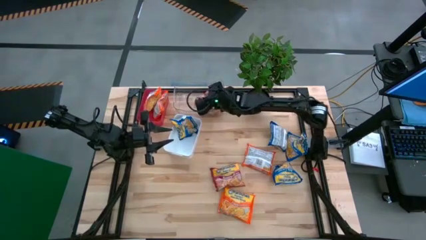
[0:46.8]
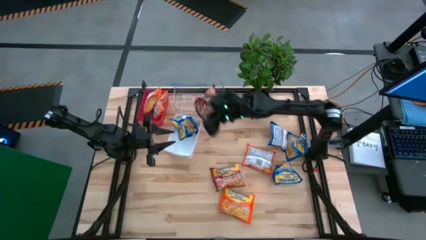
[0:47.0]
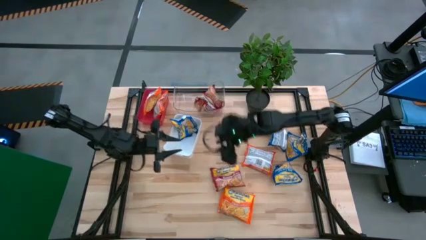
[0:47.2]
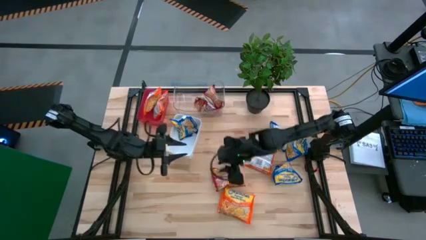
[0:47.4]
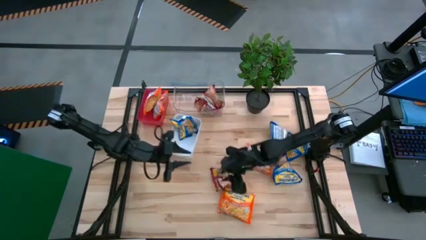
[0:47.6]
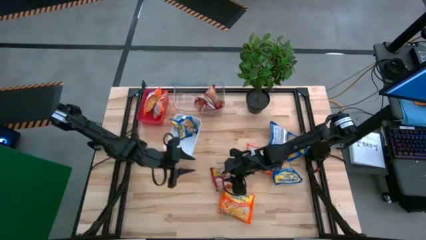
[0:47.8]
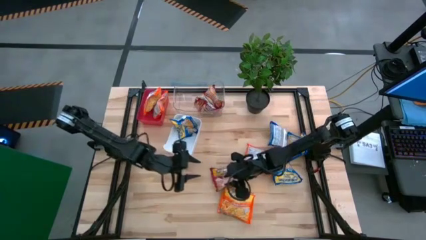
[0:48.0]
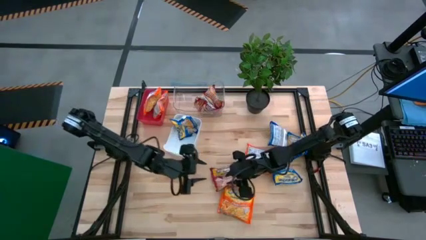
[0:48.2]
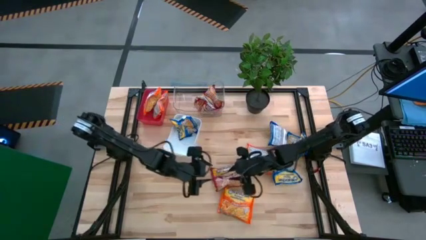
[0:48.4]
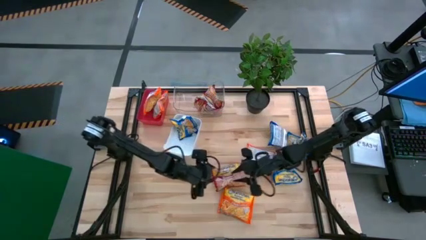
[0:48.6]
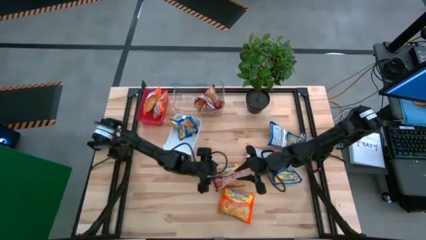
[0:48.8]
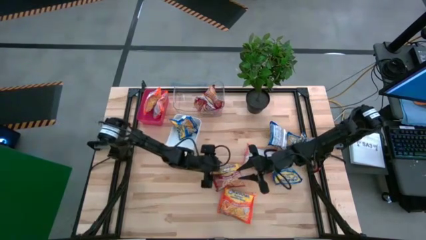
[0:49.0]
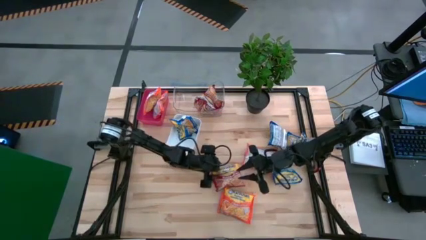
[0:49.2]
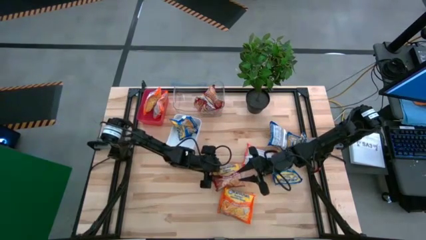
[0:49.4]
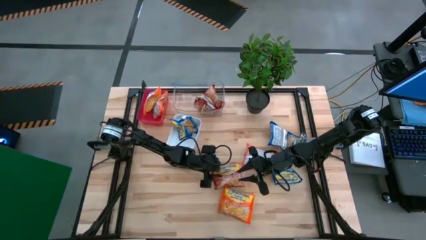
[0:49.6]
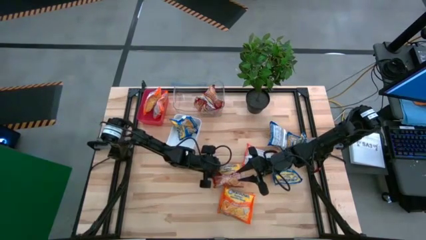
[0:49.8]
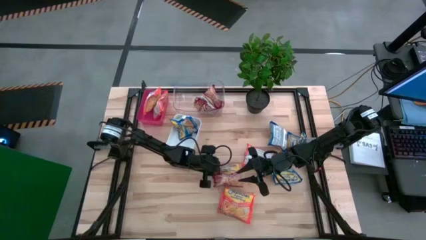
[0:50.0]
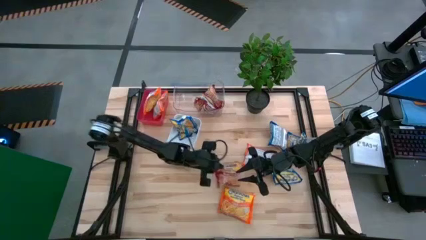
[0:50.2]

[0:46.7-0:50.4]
Task: Sort Maruchan noodles
Put the red noodle pack into the transparent bin

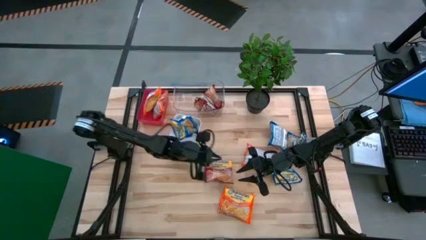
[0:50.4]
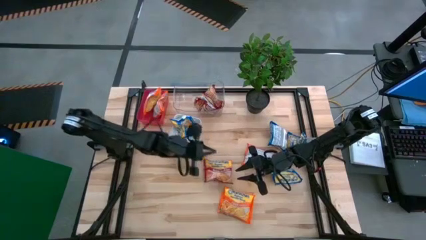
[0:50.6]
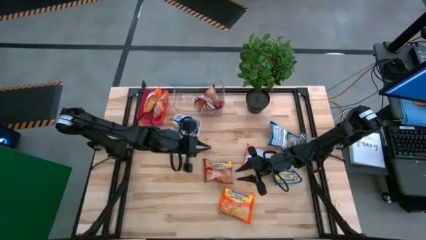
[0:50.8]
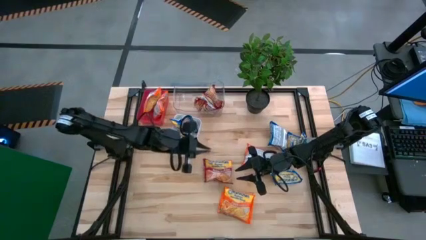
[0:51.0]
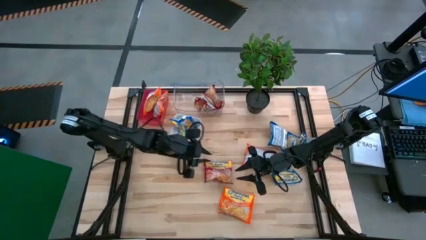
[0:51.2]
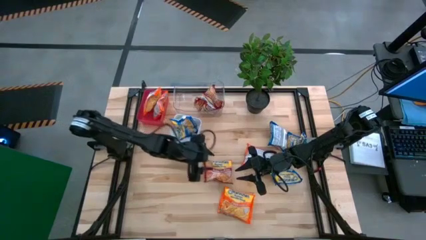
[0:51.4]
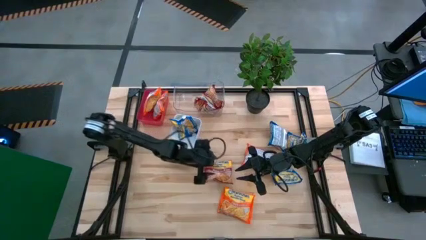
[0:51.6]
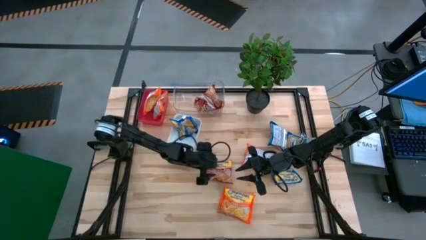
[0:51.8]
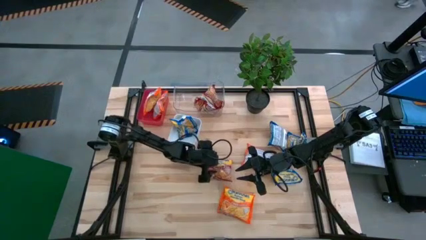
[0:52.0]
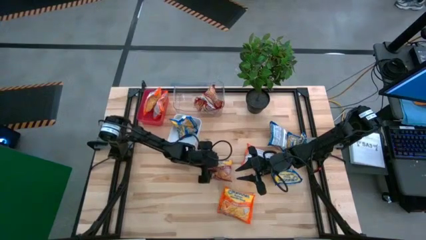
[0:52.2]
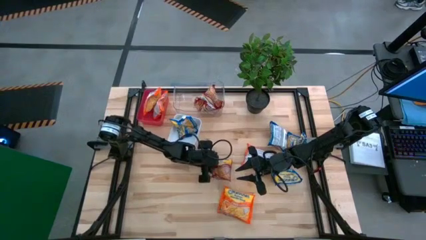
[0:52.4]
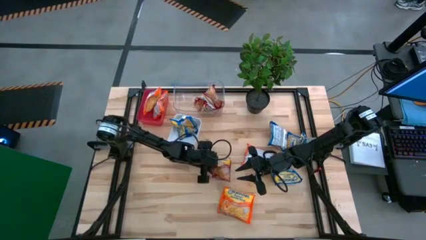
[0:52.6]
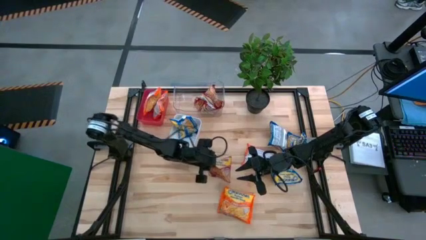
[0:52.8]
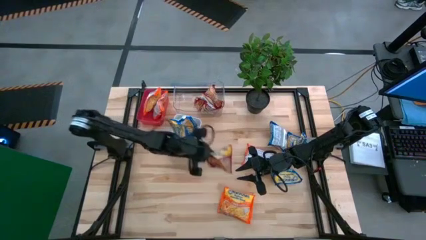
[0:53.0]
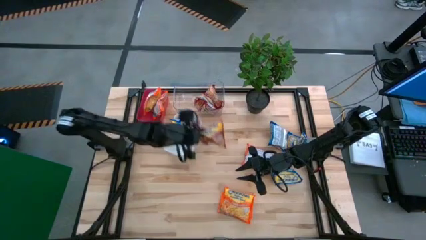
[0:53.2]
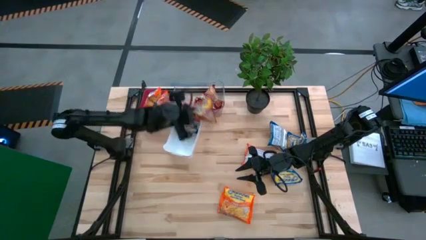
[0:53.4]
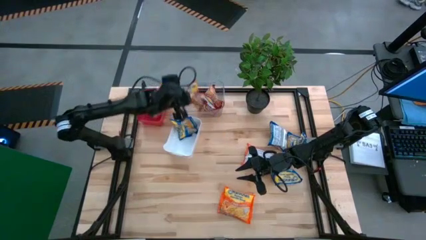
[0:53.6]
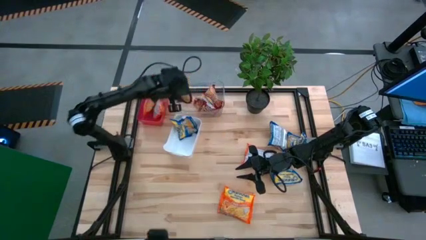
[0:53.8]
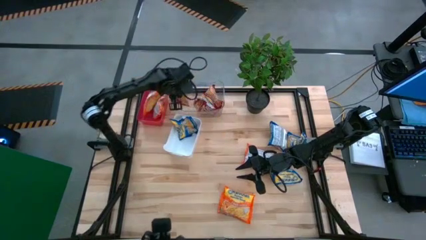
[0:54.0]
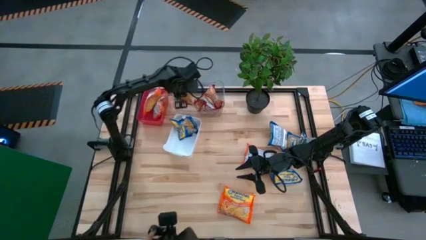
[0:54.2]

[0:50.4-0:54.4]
Put the red noodle pack into the transparent bin

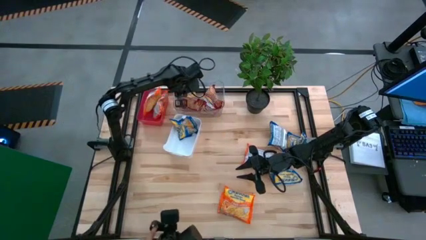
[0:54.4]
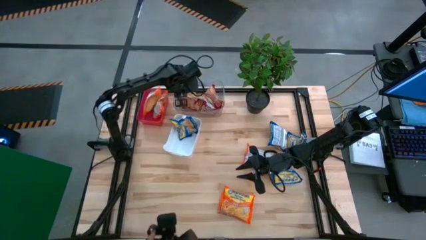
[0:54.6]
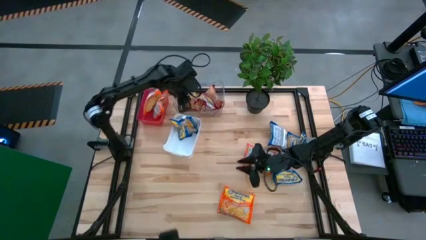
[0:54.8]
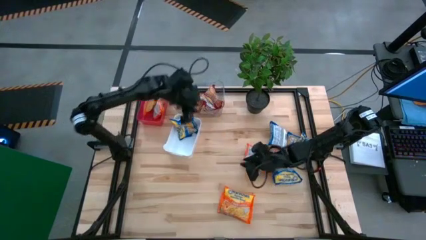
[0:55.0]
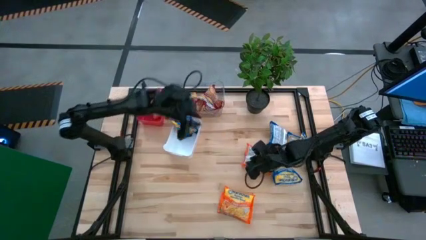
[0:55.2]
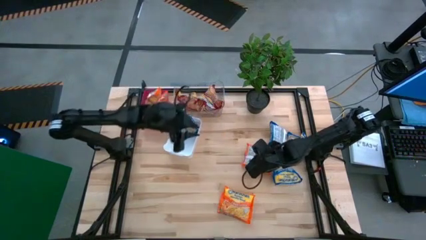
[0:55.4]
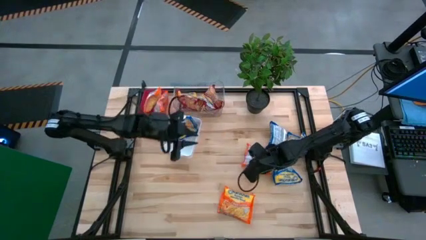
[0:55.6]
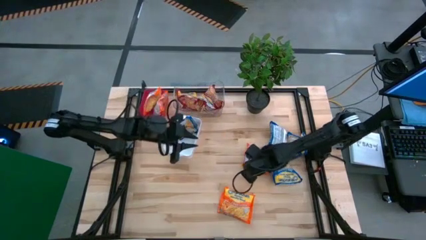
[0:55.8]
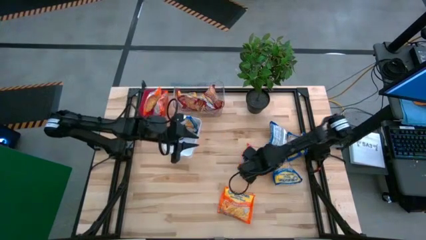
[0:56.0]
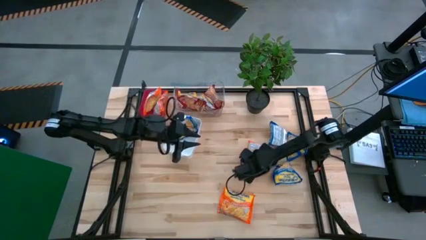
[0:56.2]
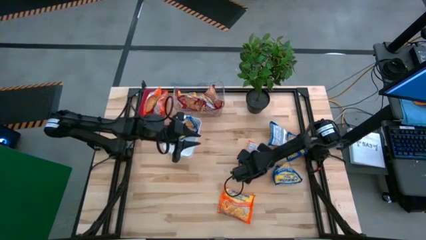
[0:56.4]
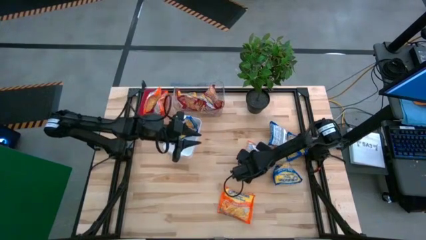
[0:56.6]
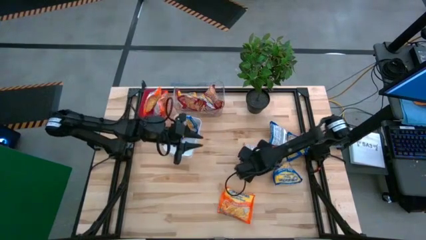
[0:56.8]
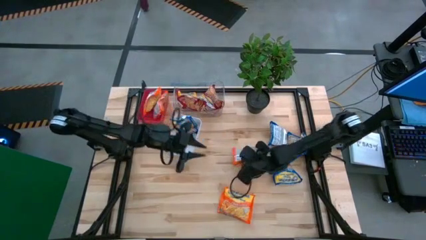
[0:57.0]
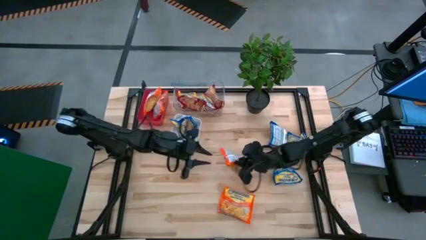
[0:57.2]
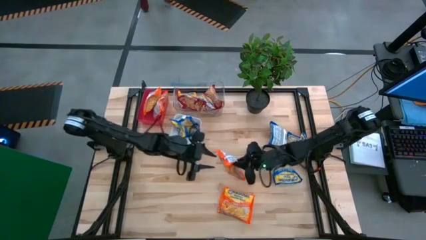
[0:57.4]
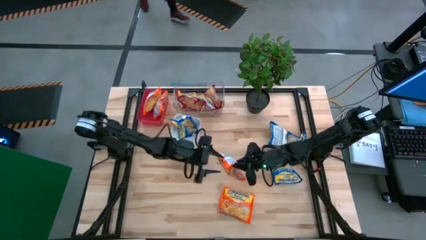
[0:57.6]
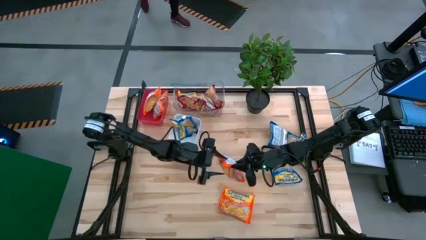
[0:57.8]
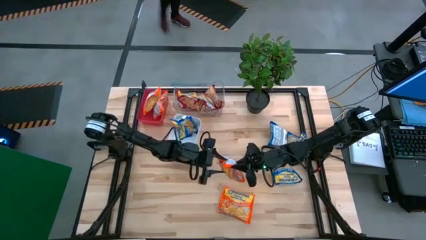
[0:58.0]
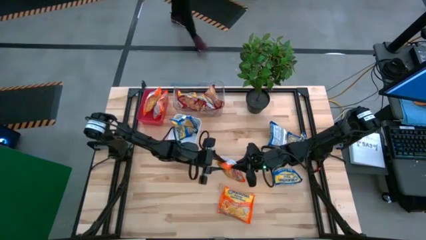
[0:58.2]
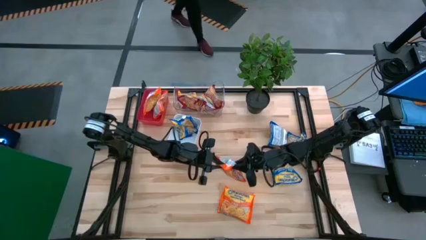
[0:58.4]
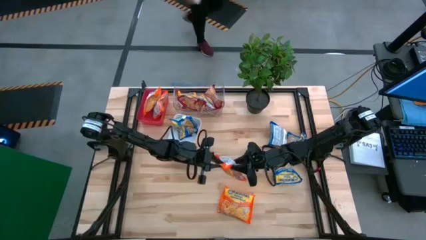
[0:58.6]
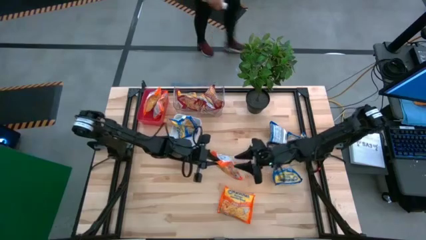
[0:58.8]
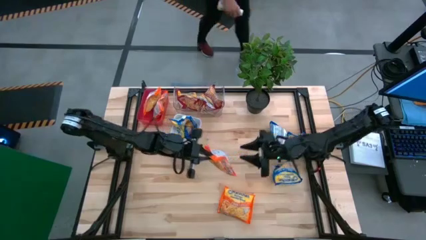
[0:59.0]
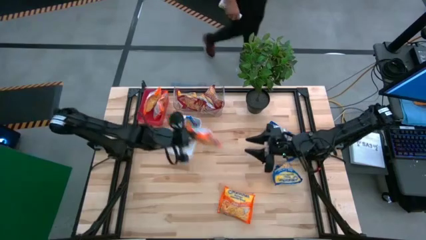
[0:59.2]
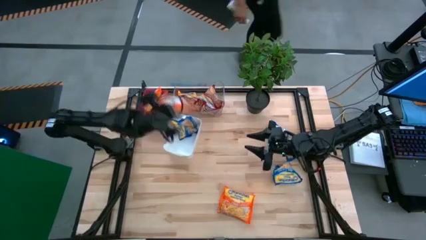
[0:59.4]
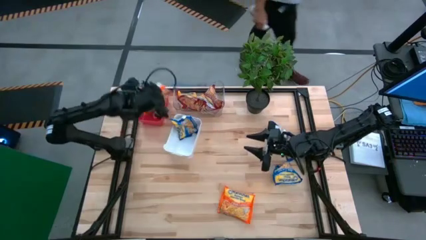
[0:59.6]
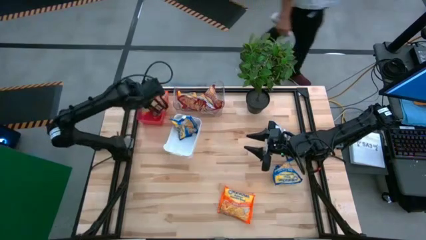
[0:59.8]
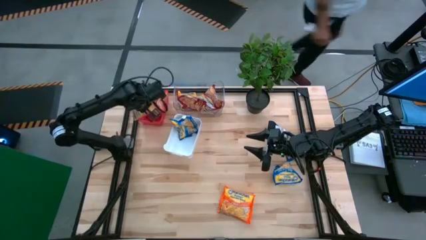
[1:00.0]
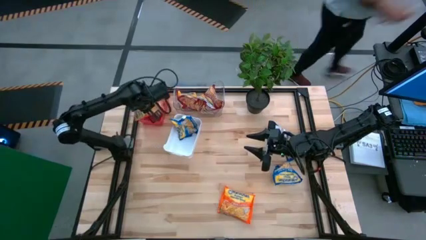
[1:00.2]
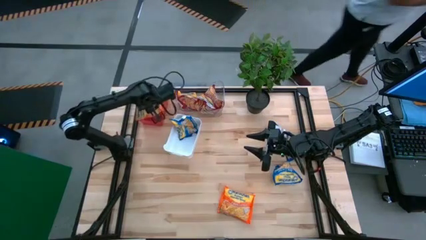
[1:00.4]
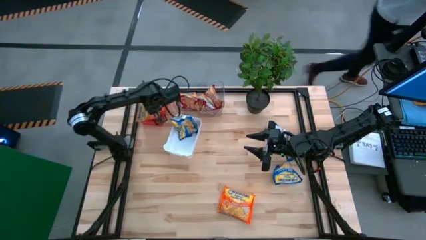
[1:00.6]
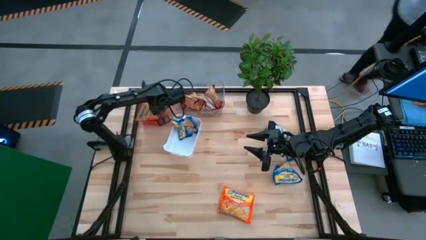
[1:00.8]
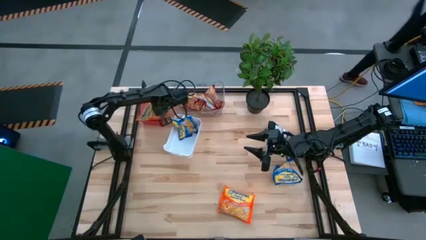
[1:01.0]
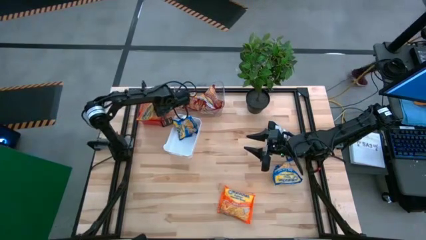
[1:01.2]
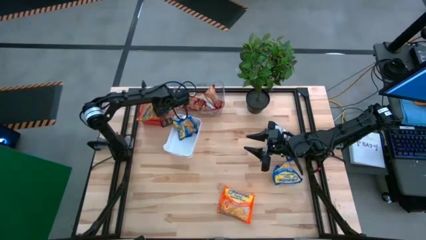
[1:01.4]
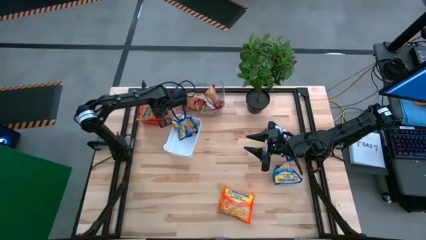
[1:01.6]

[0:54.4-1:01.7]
Put the orange noodle pack into the red bin

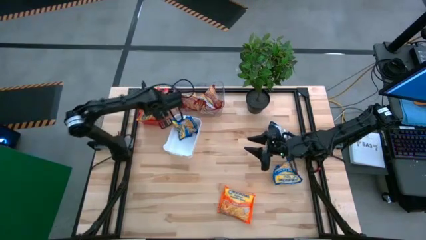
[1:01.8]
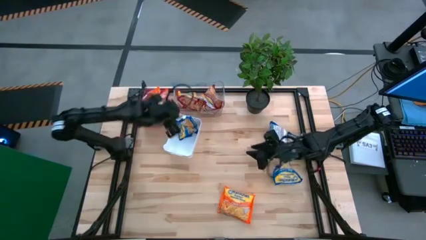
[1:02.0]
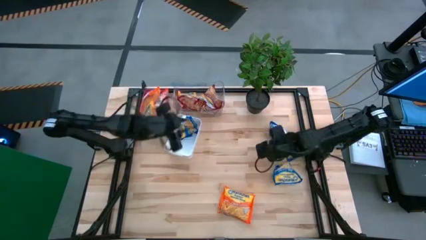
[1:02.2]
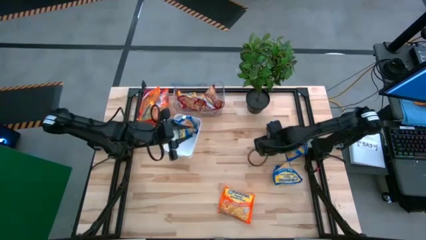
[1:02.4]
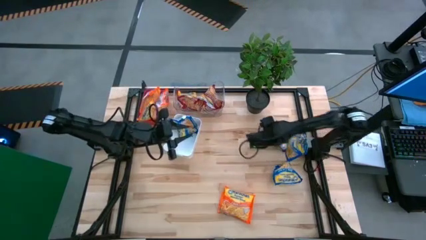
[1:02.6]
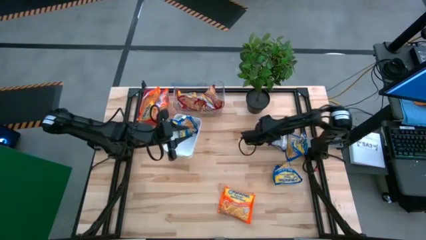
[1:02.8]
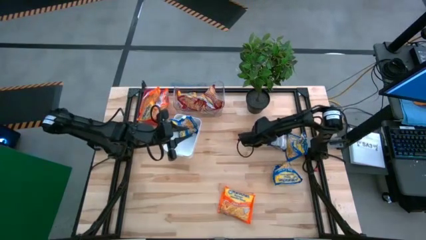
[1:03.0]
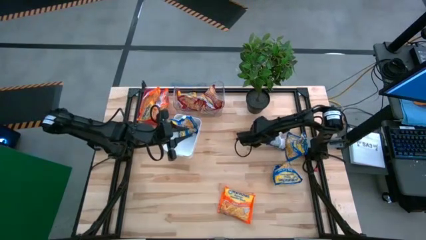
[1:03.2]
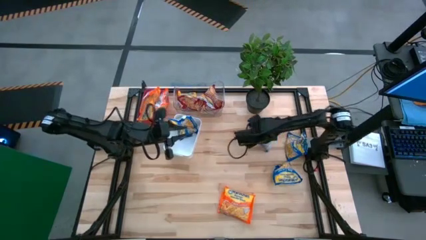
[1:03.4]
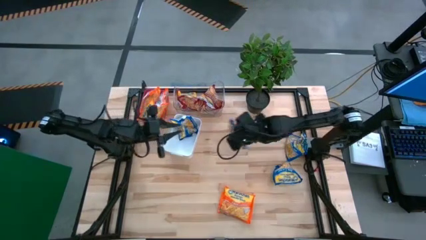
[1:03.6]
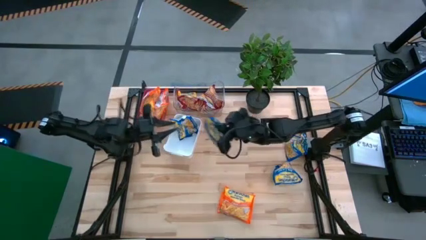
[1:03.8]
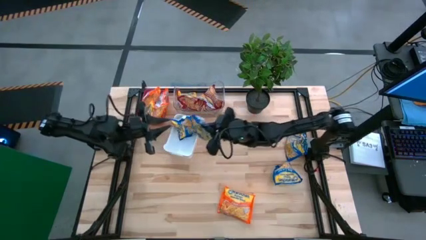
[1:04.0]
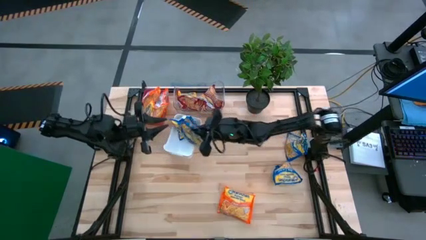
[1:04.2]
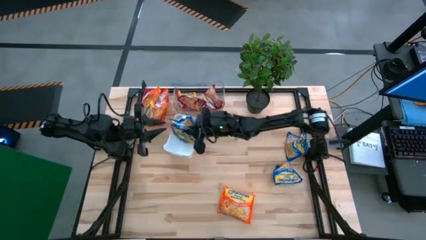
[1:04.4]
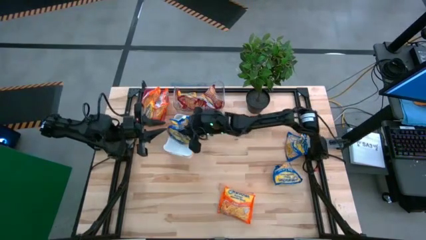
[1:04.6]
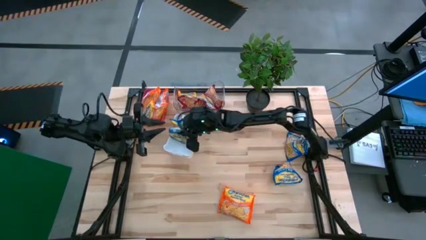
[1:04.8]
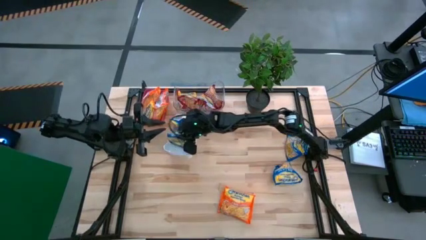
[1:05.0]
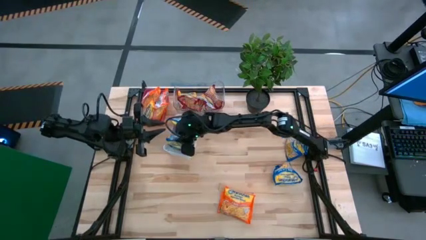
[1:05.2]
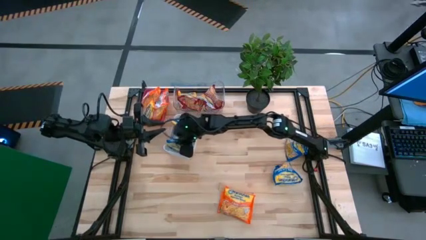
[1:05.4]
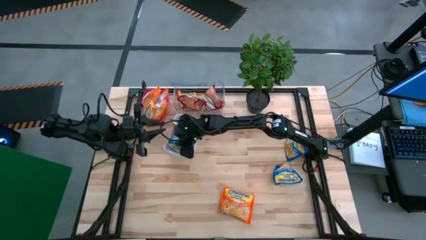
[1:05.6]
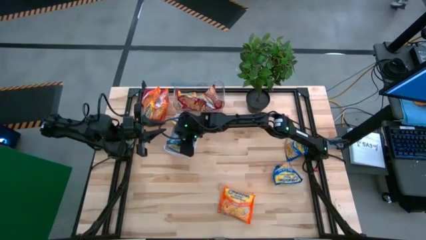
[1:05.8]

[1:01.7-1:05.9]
Put the blue noodle pack into the white bin
